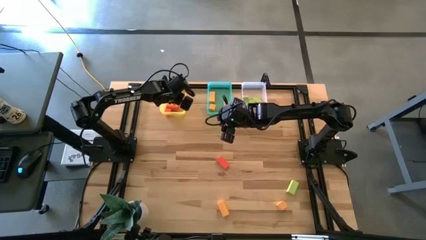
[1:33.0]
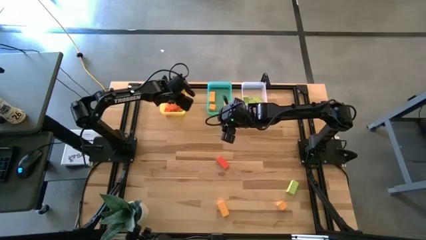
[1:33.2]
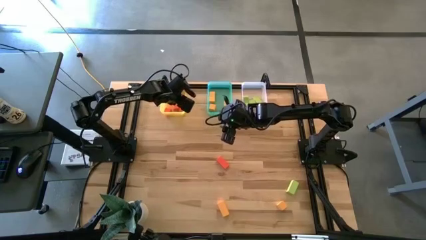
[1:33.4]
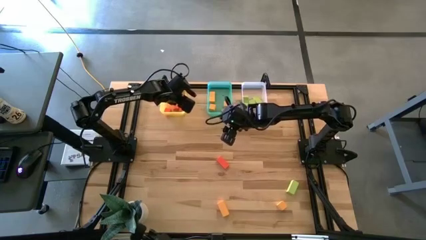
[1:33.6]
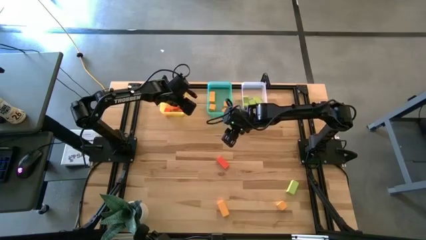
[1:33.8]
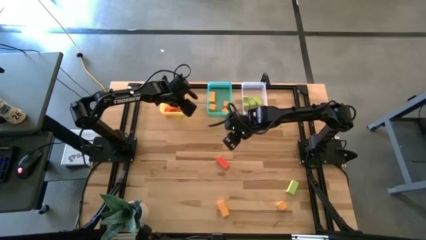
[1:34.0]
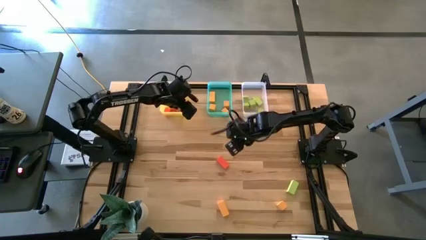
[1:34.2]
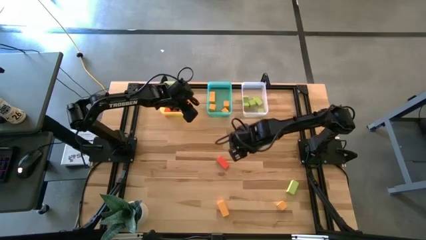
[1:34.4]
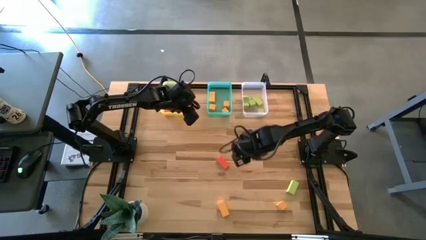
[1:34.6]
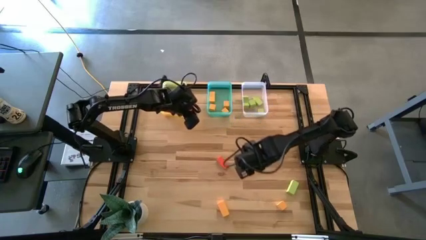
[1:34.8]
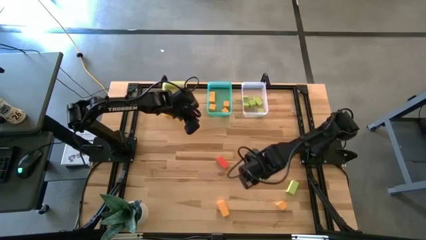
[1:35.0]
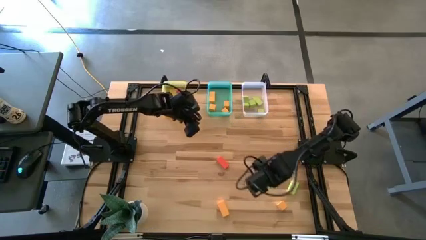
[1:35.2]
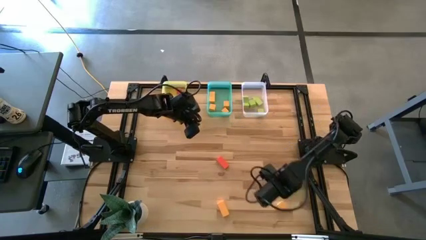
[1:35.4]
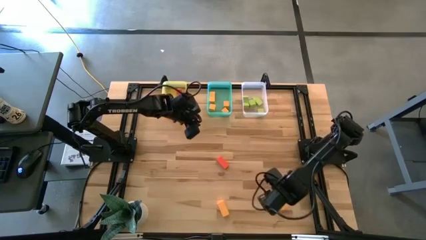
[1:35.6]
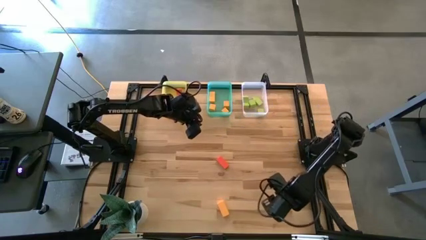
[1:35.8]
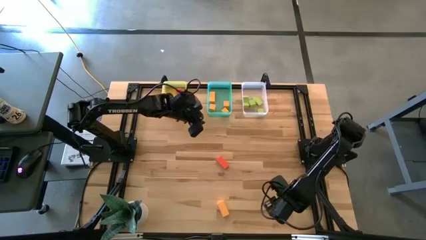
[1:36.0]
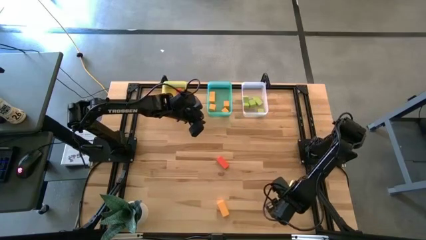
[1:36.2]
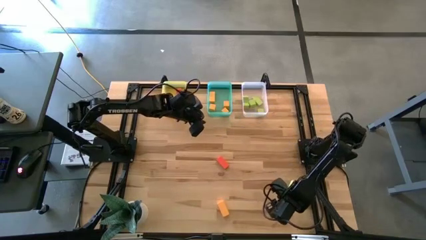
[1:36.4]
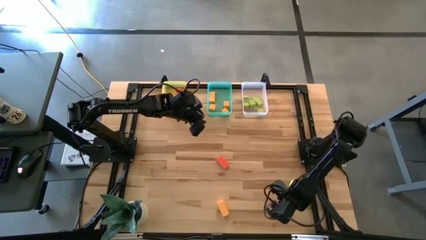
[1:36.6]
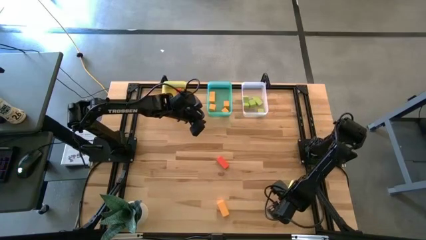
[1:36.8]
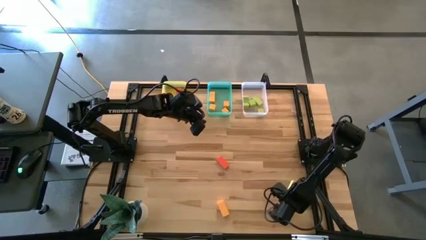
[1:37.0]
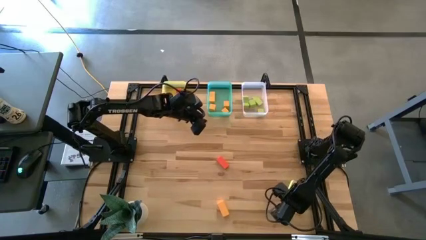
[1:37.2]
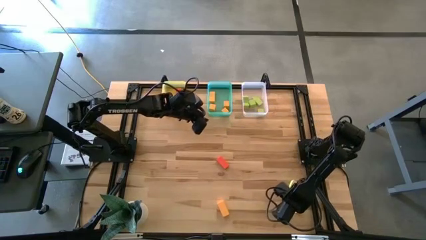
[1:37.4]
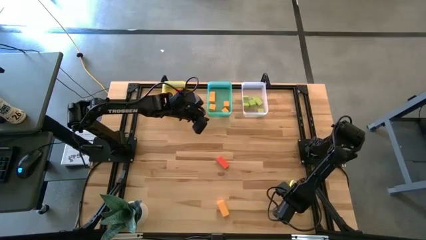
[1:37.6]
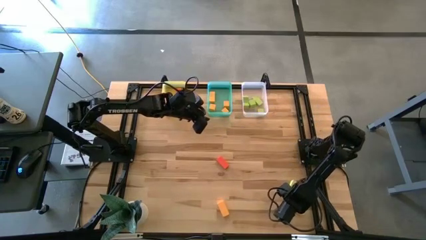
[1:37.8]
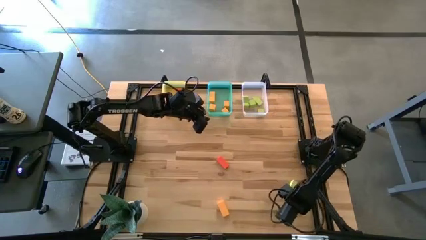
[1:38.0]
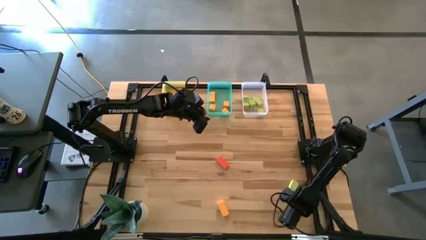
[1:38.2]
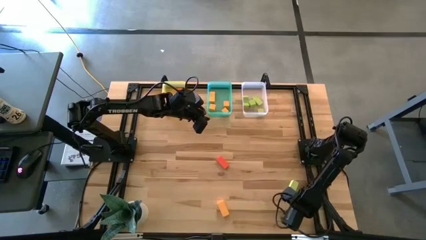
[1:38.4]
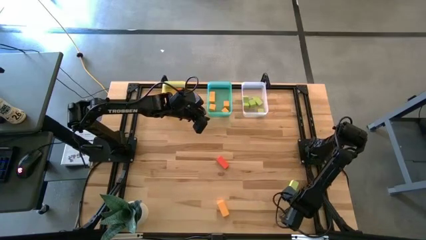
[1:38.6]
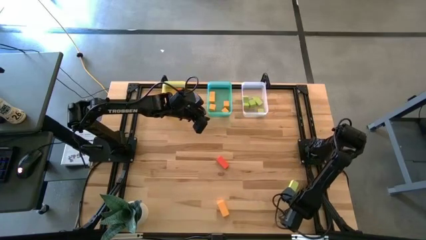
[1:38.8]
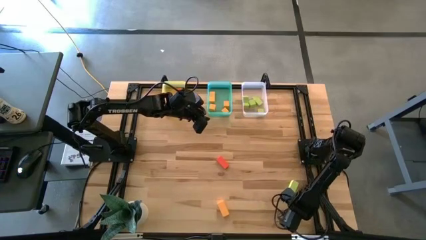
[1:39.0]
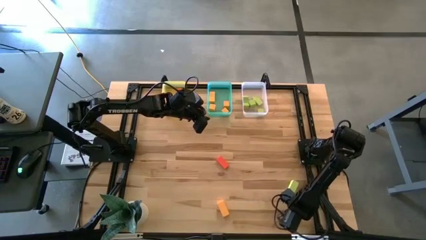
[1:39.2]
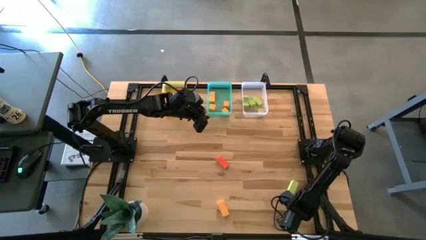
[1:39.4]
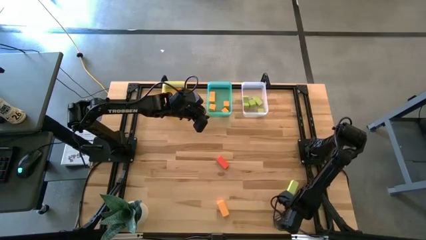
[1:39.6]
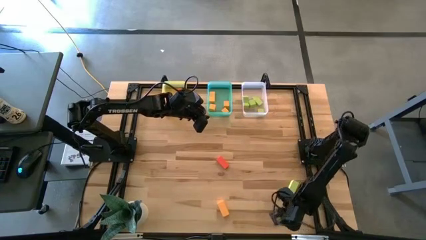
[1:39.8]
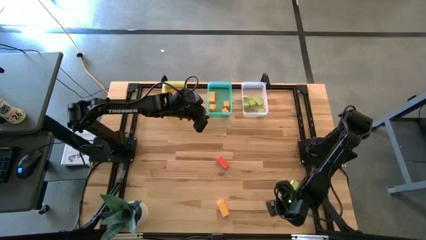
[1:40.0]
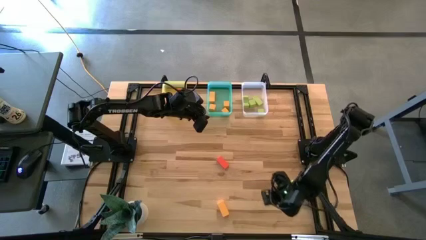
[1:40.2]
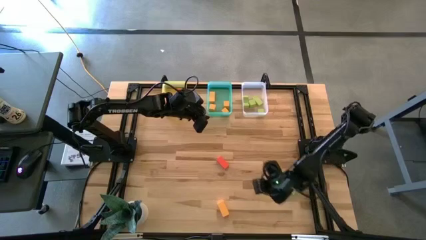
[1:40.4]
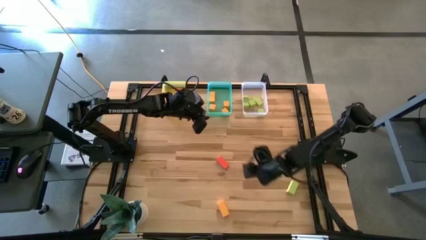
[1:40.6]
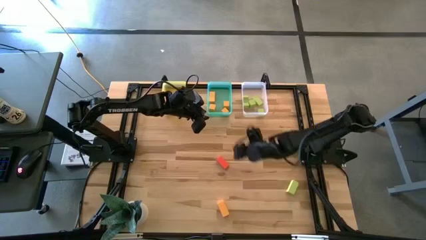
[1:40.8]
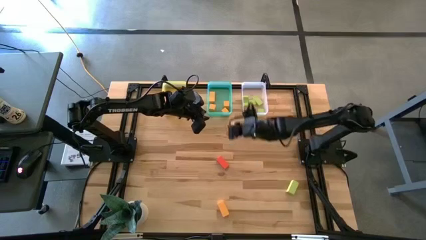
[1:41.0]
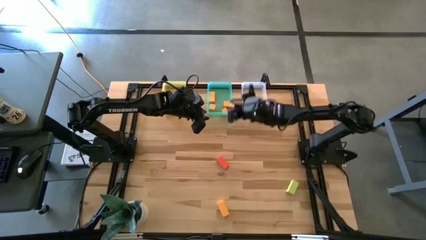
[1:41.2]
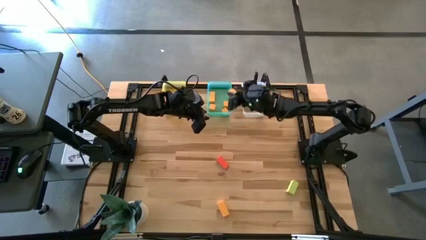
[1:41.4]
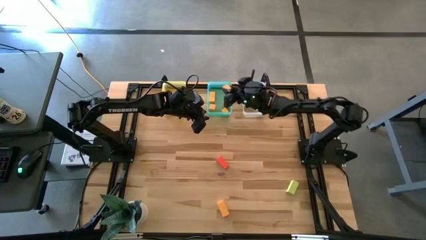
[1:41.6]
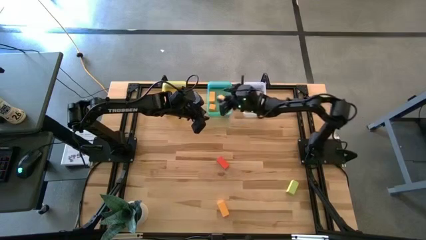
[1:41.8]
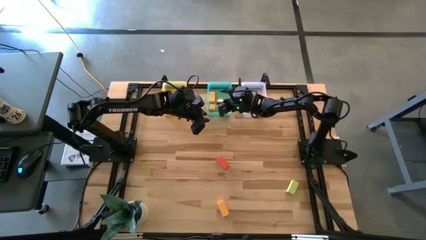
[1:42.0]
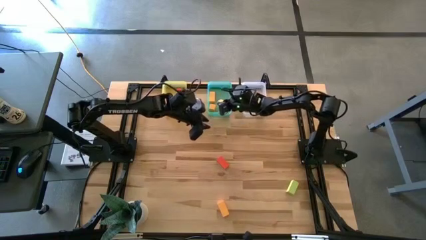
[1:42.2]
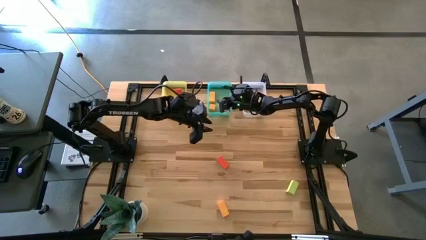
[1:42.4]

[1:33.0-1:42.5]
Task: Sort & place blocks by color
Put the yellow block into the green bin

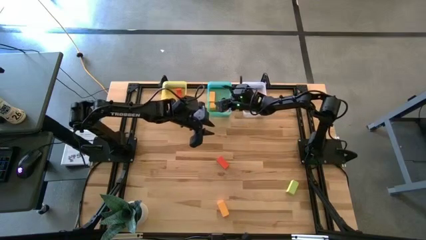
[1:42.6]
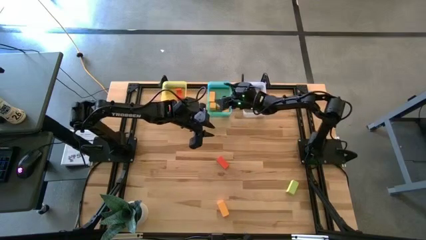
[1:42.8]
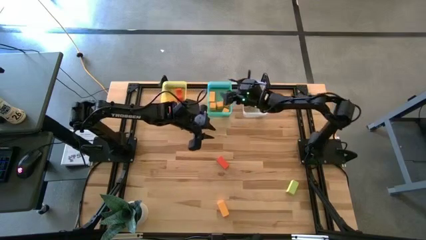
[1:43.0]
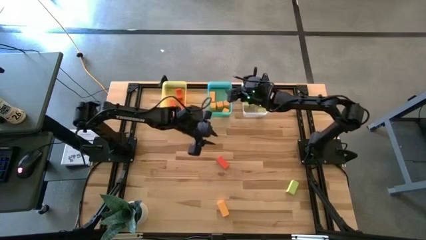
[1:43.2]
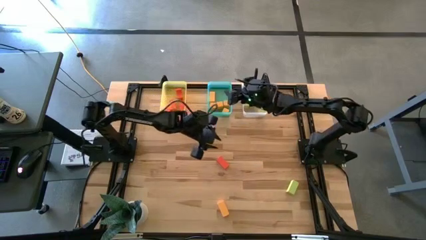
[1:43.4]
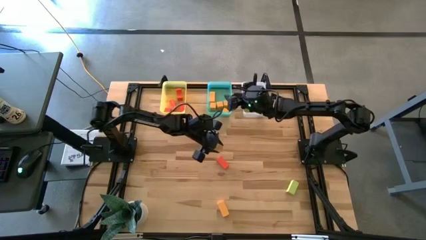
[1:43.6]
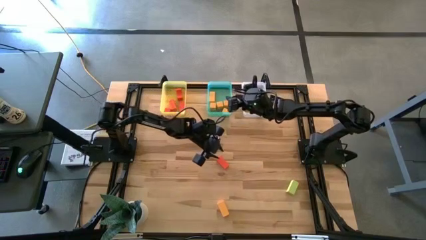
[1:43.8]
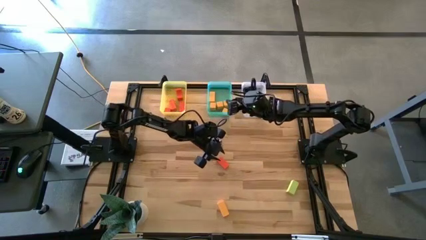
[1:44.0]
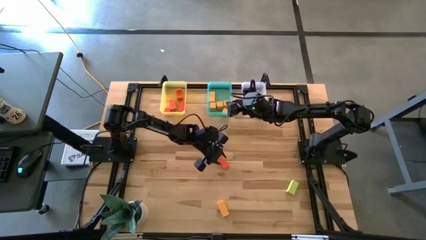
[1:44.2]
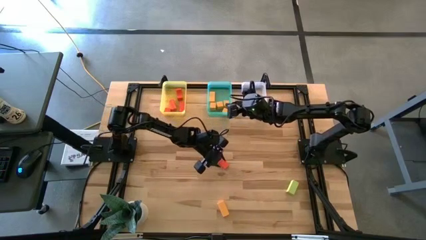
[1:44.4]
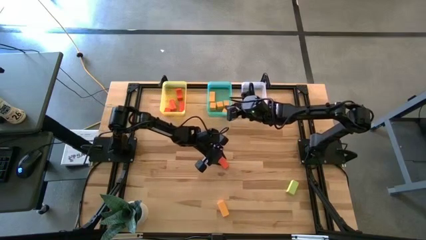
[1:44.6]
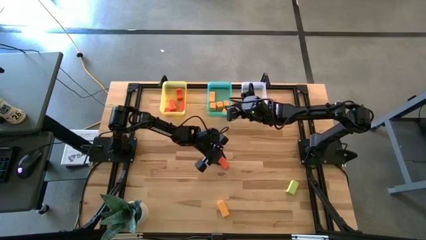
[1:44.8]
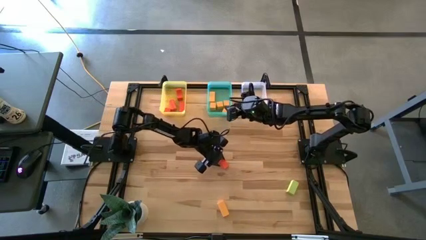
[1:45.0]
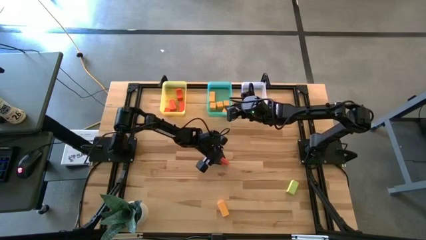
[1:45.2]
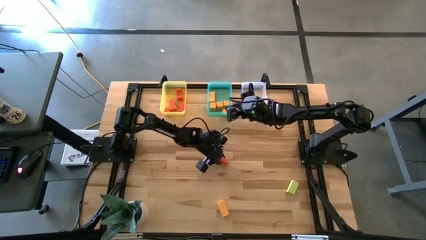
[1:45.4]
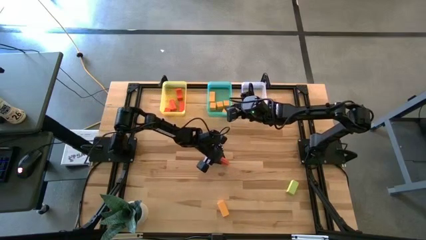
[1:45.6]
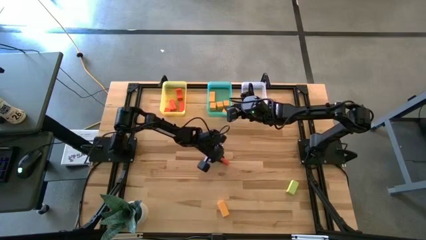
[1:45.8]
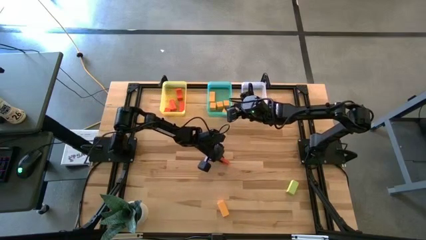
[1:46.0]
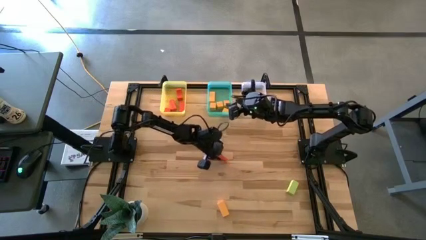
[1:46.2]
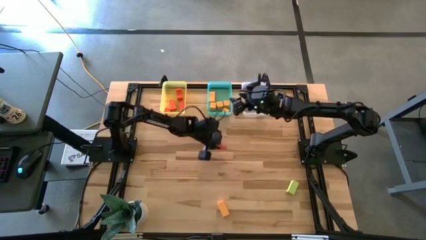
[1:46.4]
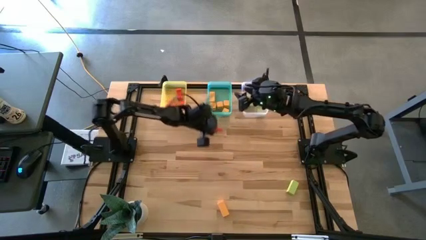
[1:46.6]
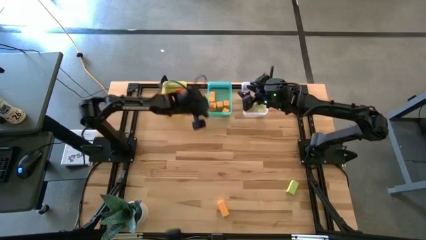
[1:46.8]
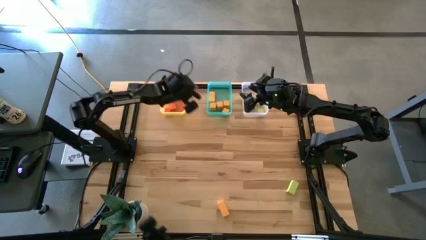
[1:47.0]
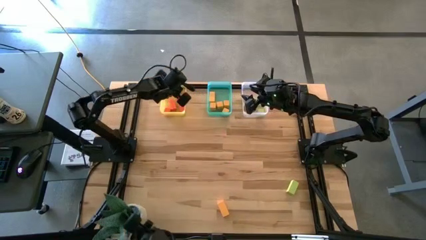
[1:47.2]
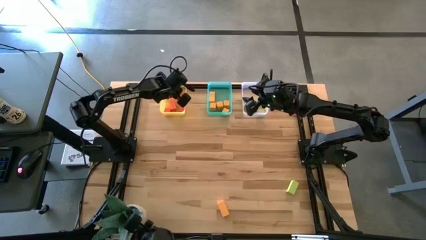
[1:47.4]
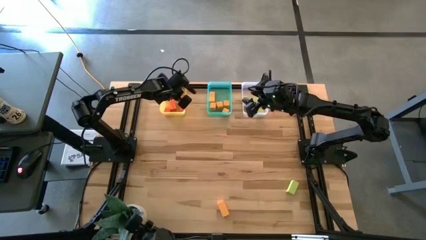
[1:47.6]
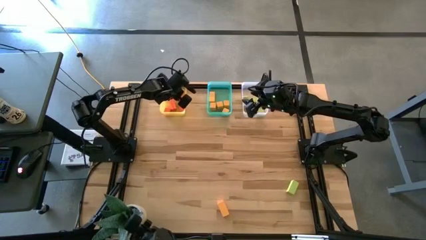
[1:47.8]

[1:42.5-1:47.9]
Put the orange block into the yellow bin
